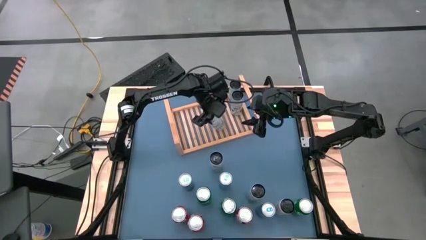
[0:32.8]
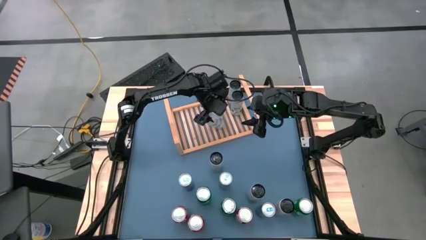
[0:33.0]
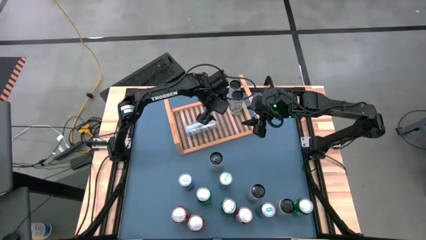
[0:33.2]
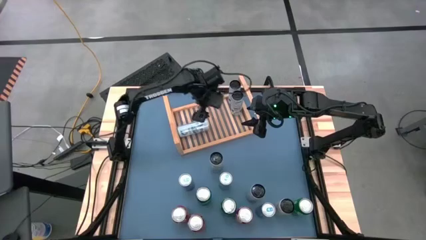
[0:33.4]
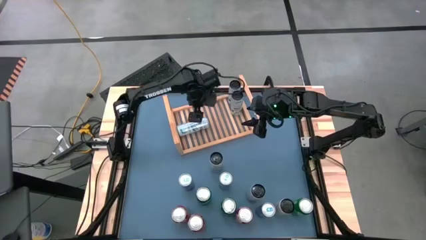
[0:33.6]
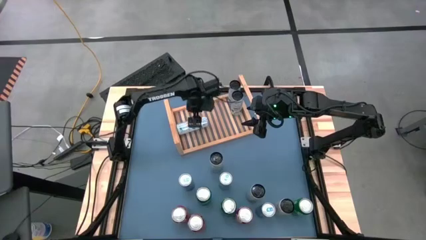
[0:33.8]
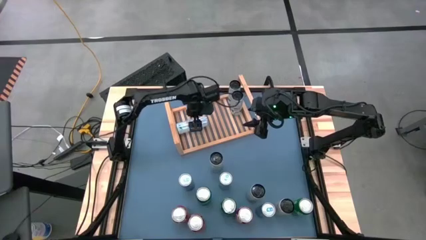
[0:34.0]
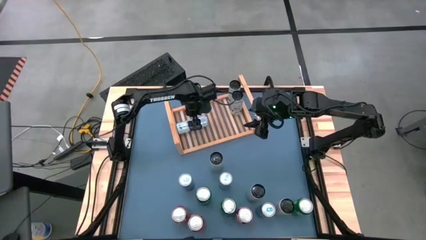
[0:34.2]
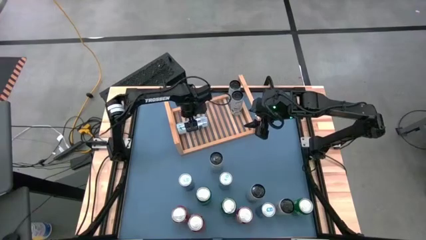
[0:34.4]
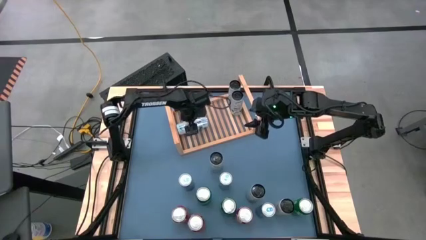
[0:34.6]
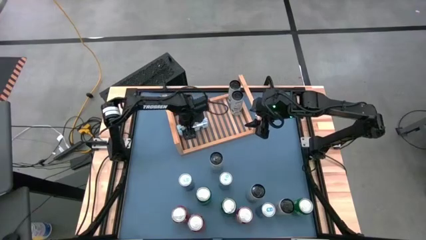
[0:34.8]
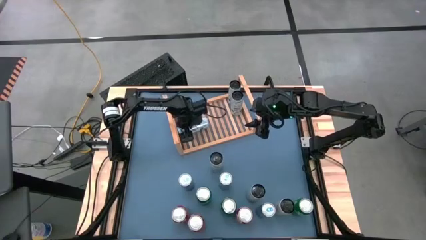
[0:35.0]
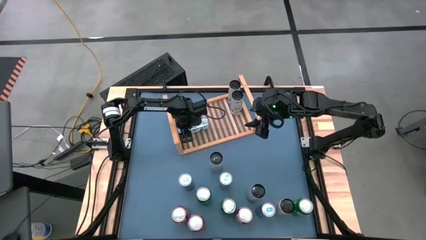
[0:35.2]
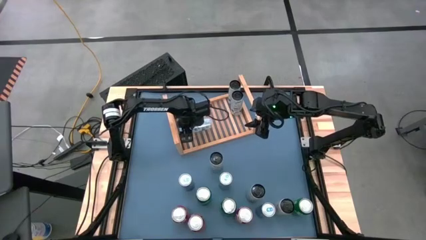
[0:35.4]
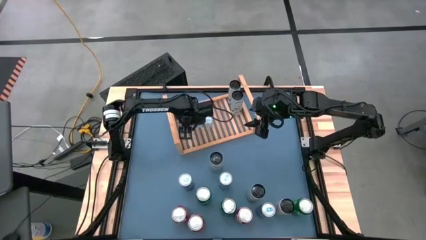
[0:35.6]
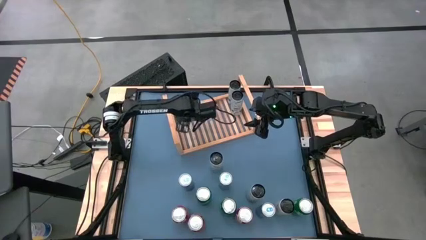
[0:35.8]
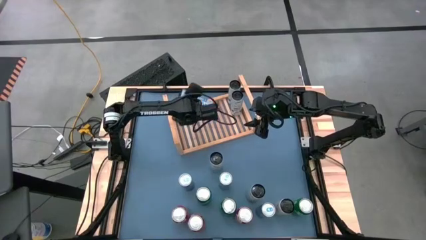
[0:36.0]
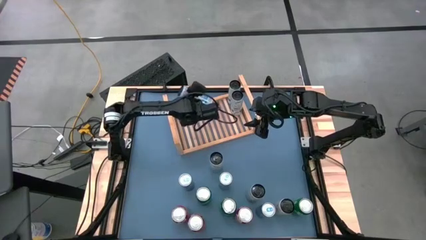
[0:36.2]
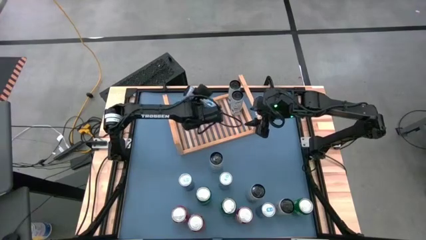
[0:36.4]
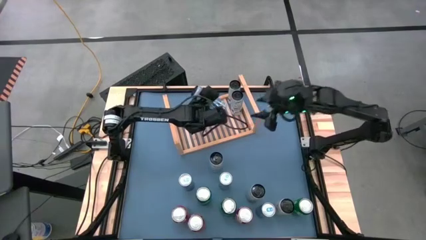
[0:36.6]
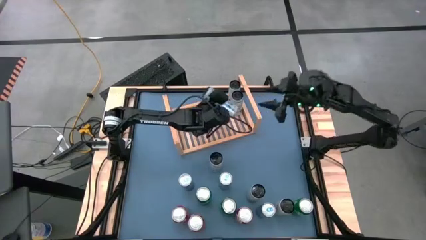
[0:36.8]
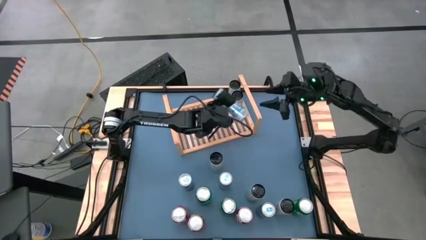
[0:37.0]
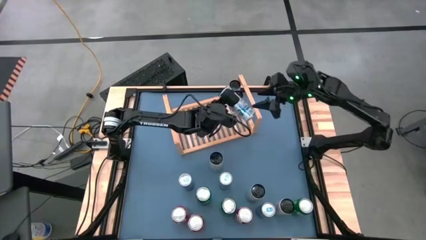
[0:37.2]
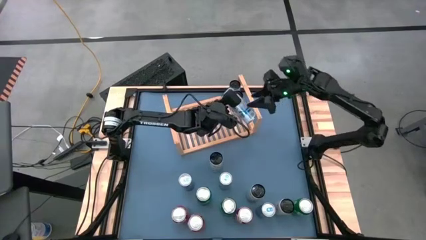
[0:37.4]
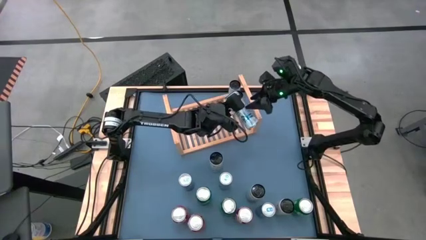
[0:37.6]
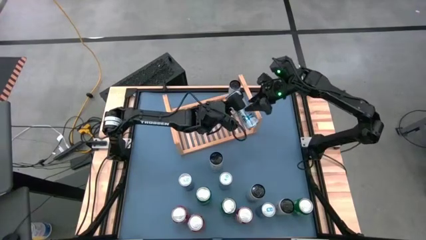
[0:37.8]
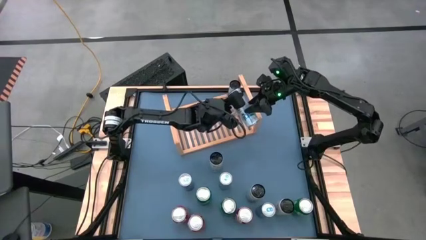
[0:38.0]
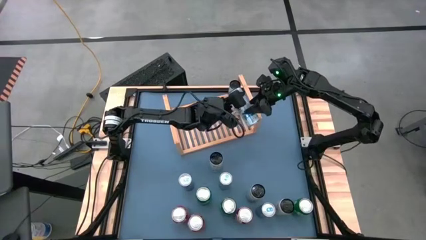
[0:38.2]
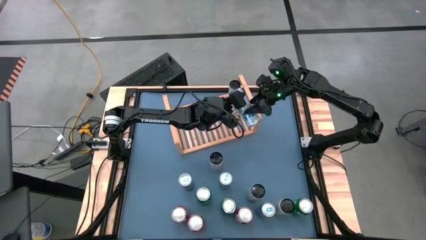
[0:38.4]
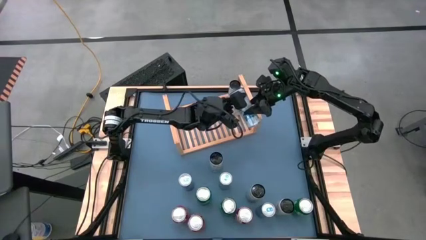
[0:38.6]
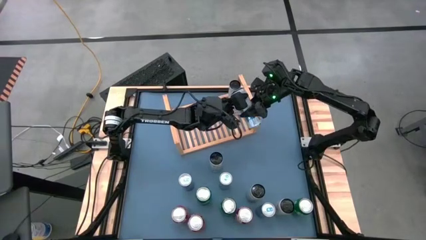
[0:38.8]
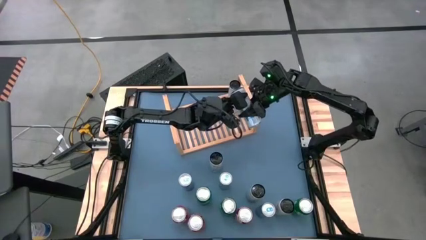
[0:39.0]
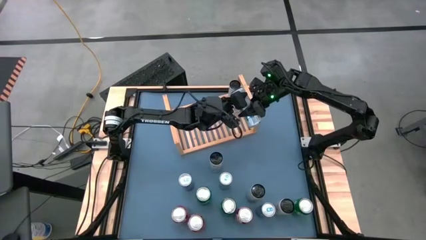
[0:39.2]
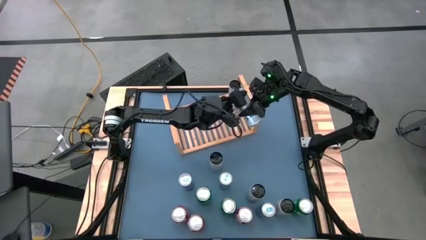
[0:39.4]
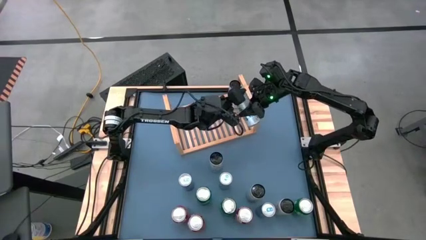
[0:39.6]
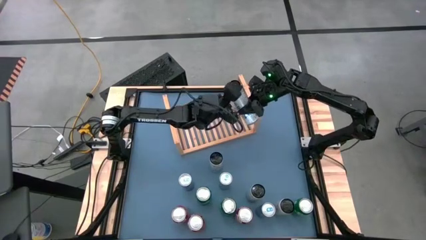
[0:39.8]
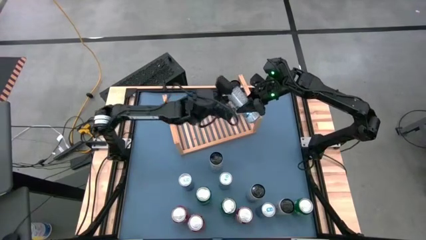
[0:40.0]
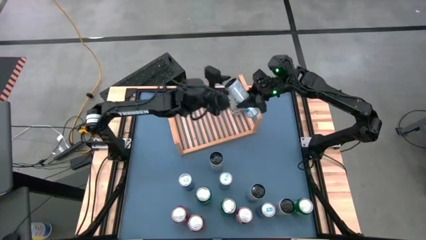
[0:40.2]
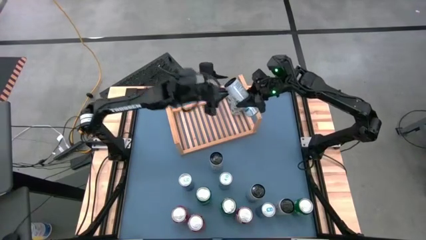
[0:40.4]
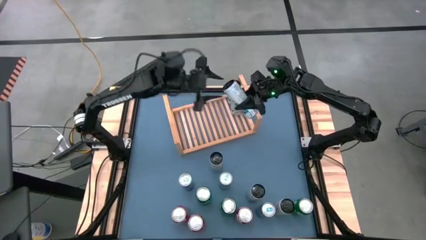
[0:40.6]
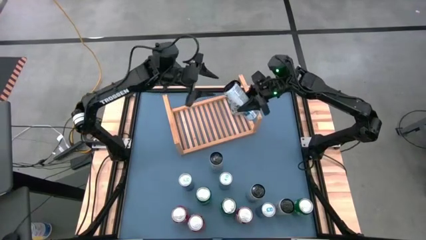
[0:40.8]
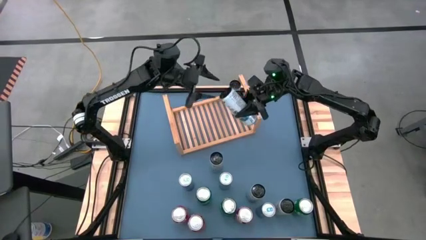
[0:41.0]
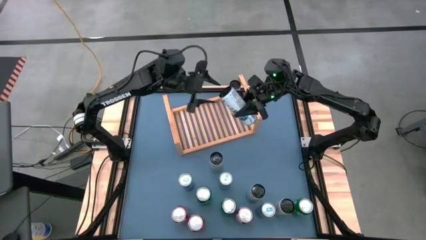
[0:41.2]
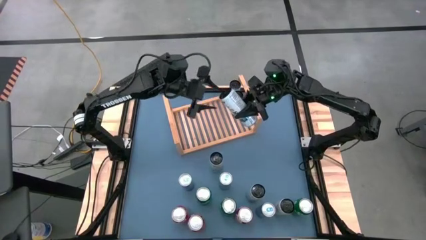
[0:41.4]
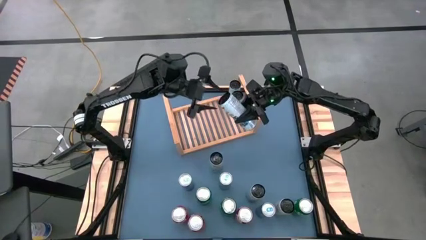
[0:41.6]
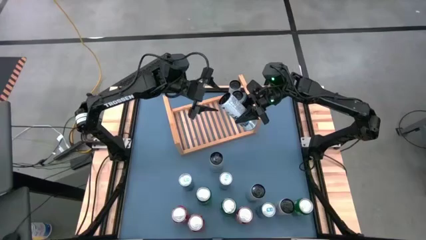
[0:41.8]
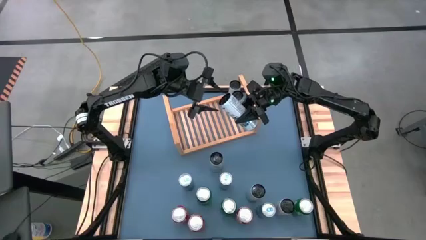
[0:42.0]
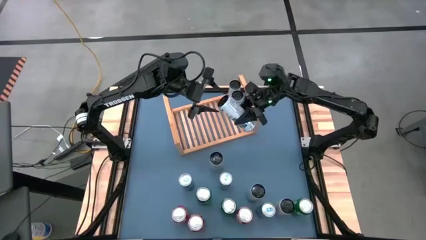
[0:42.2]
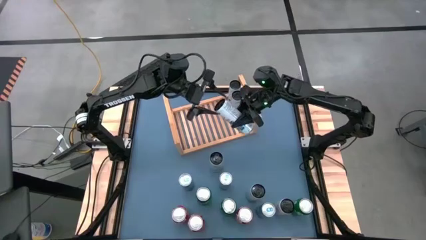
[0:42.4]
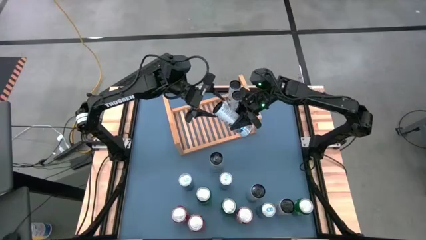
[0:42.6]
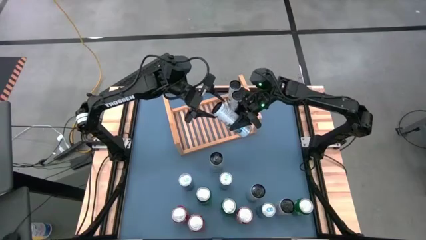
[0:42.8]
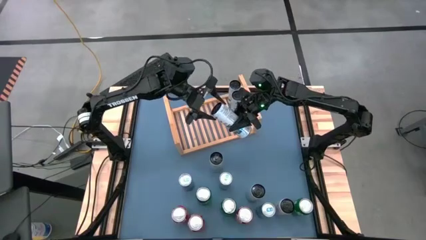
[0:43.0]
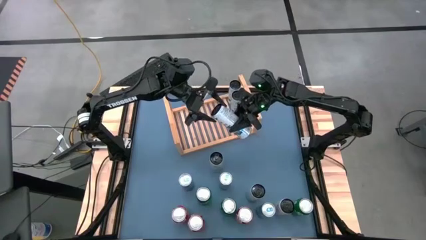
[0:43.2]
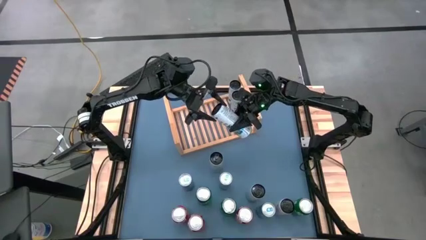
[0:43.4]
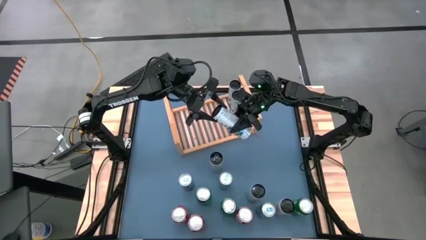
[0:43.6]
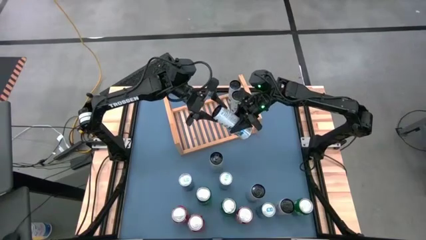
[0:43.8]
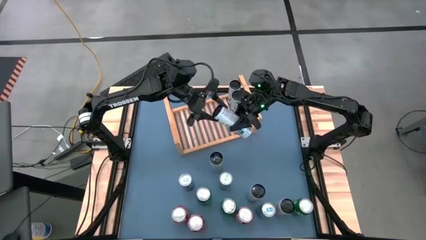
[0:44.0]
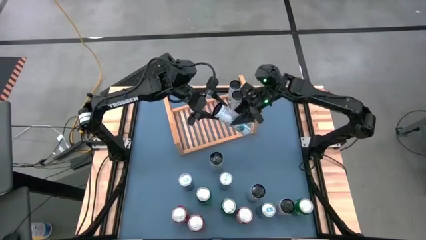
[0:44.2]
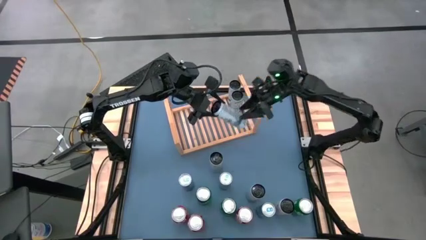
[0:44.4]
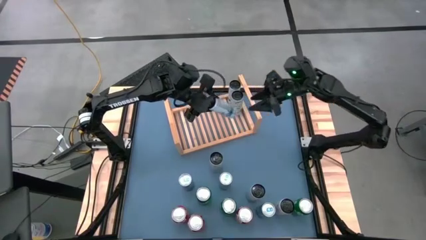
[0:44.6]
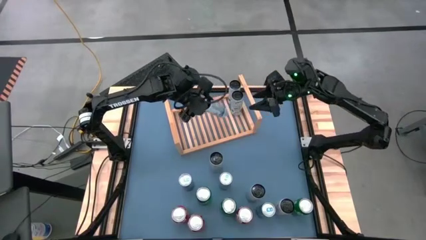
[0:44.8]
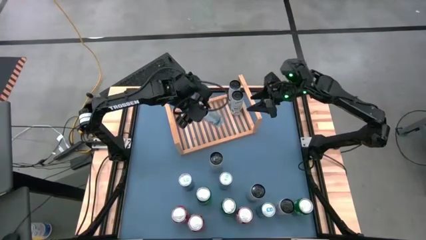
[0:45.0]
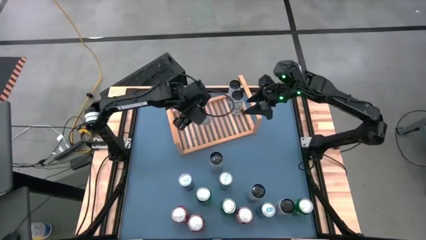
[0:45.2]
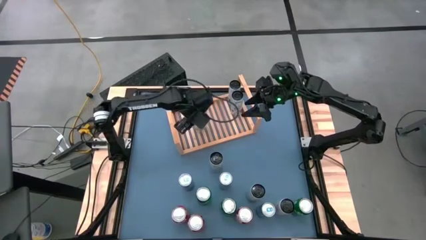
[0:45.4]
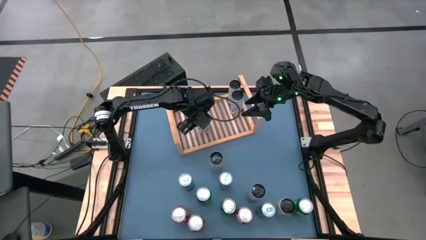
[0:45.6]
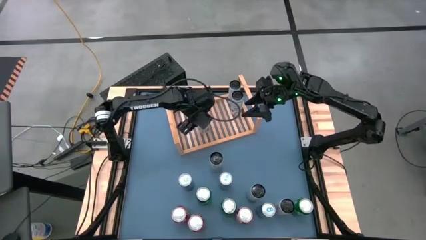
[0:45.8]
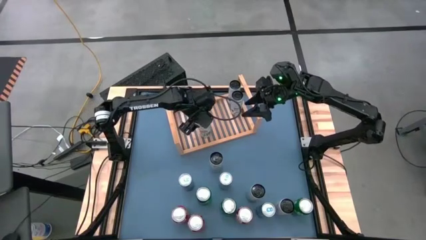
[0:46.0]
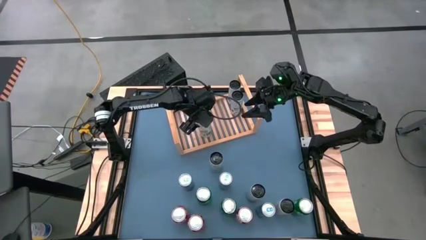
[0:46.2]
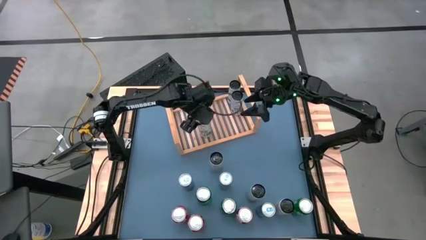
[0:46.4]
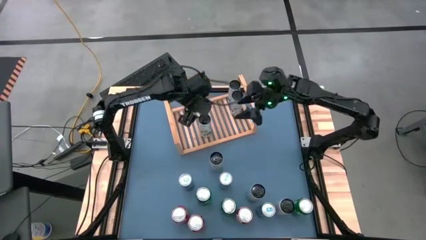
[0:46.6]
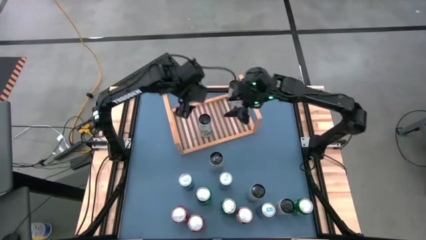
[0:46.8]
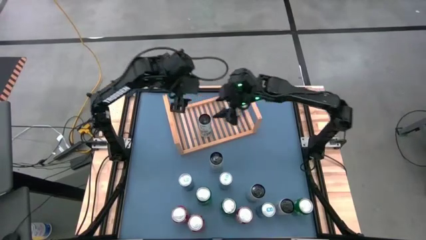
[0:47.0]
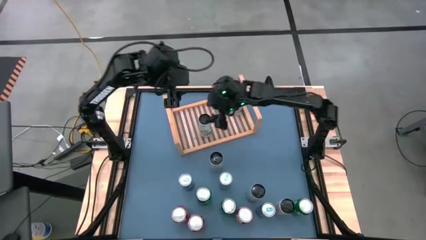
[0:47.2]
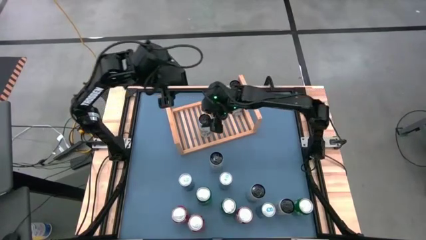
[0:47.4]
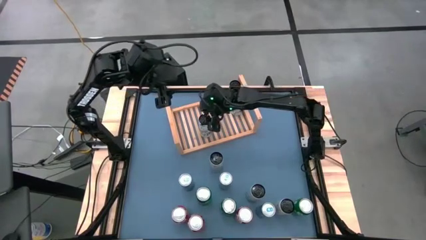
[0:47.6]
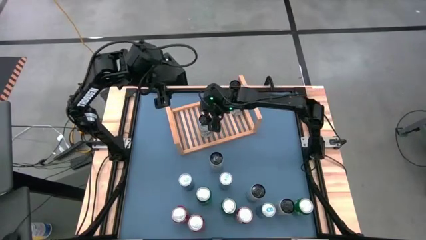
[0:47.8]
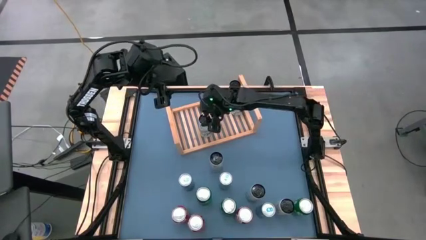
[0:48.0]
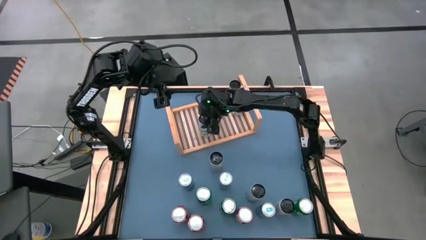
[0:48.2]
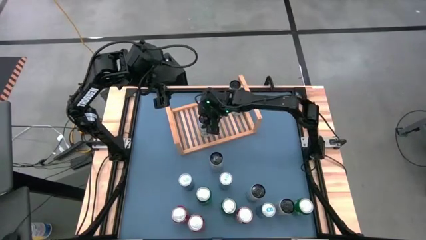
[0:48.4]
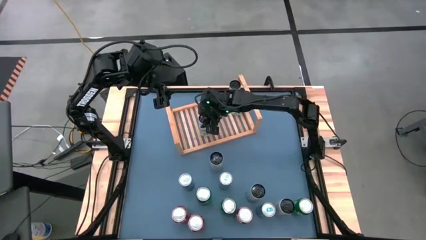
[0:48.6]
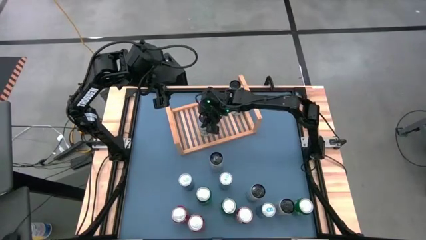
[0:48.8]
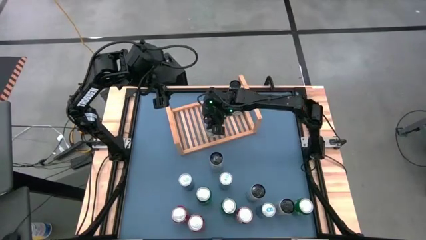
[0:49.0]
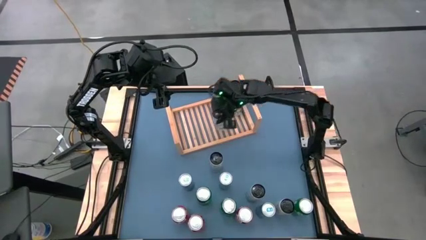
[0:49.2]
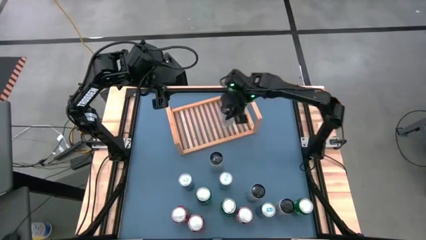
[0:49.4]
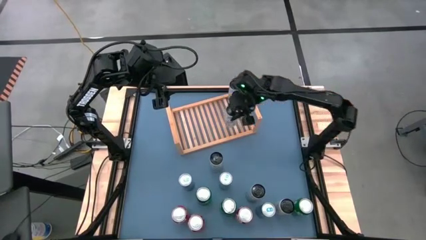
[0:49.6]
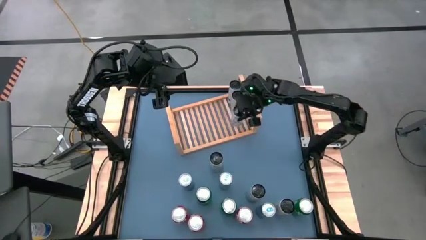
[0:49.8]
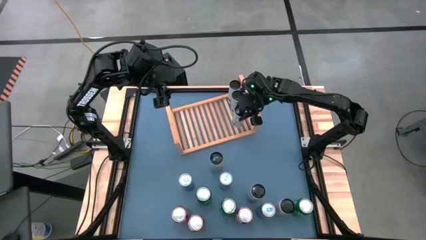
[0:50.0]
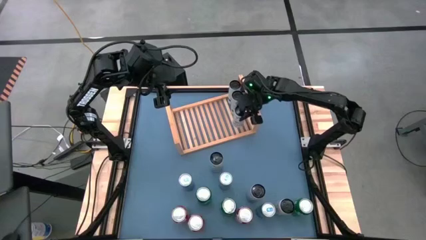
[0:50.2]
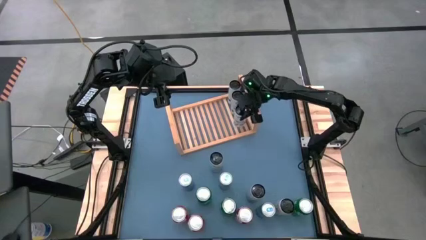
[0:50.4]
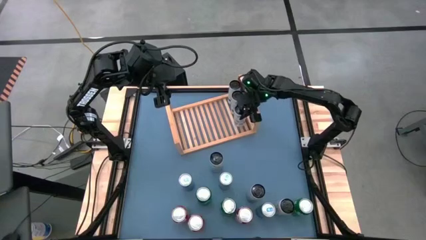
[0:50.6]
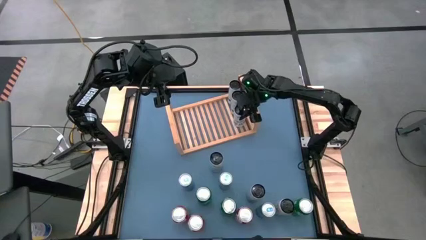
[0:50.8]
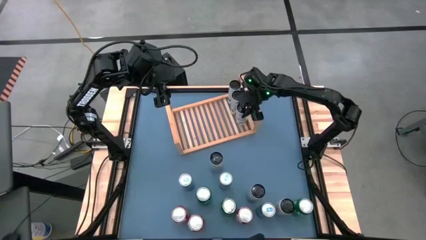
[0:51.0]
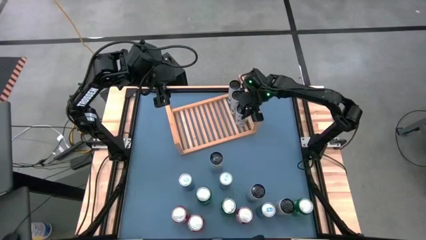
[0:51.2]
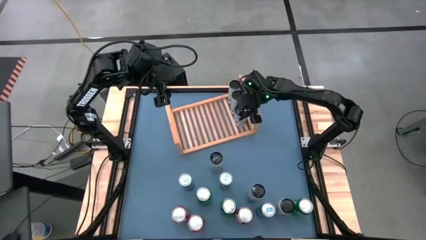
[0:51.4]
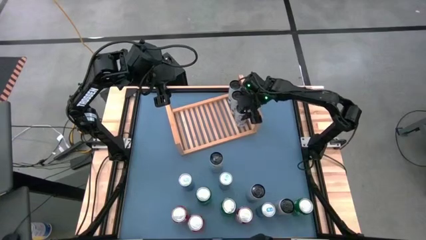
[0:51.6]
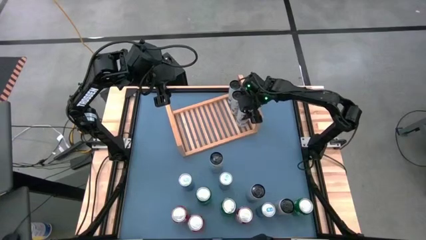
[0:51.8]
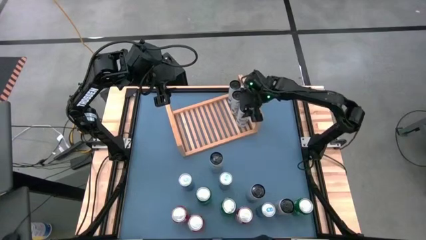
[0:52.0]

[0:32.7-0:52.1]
Task: Place canned beverage on shelf
Put the white-blue soda can on the shelf aligned with the other white-blue soda cans
